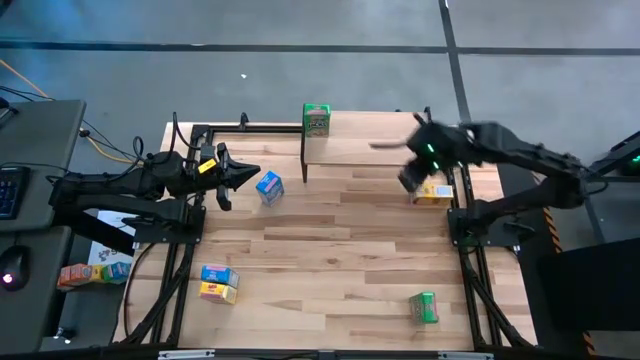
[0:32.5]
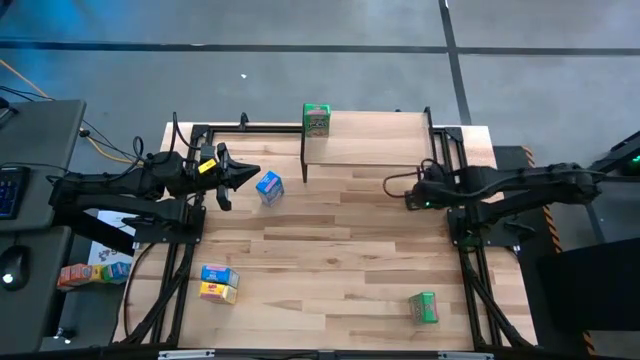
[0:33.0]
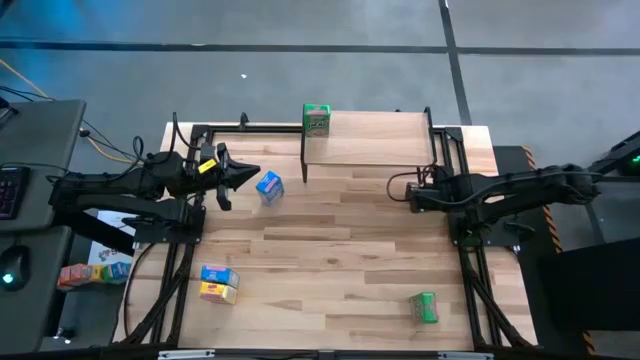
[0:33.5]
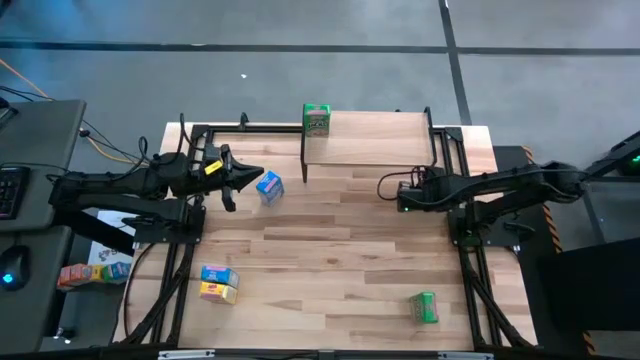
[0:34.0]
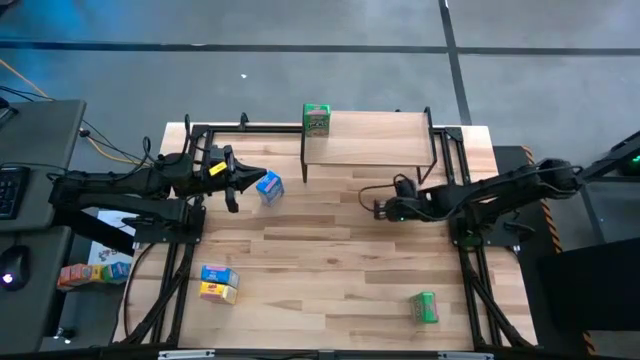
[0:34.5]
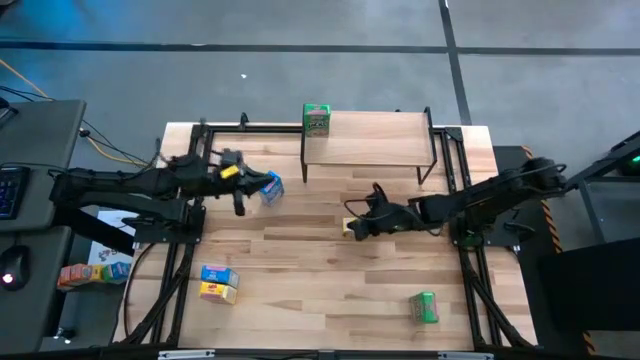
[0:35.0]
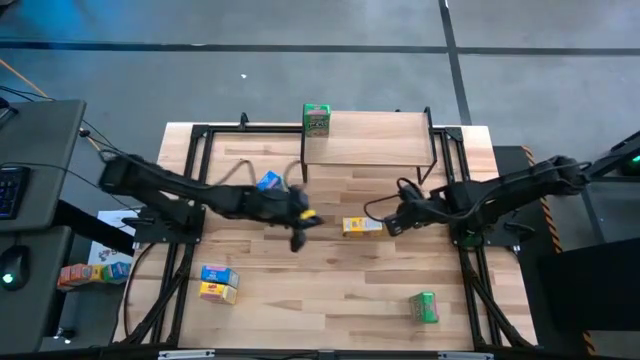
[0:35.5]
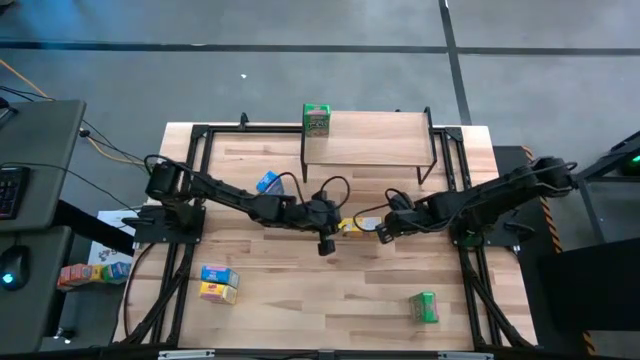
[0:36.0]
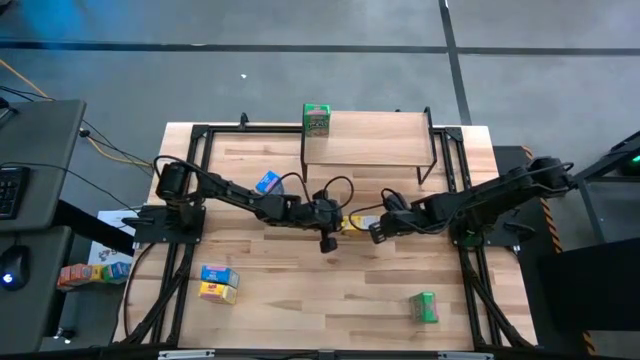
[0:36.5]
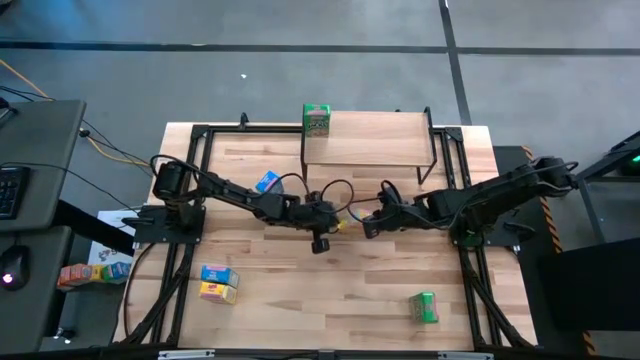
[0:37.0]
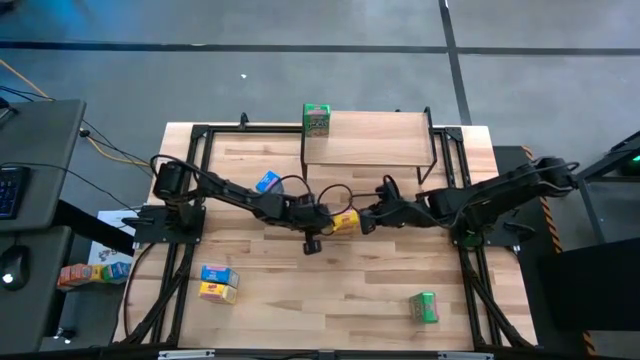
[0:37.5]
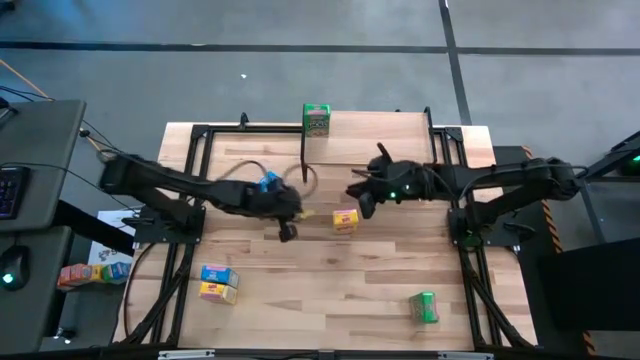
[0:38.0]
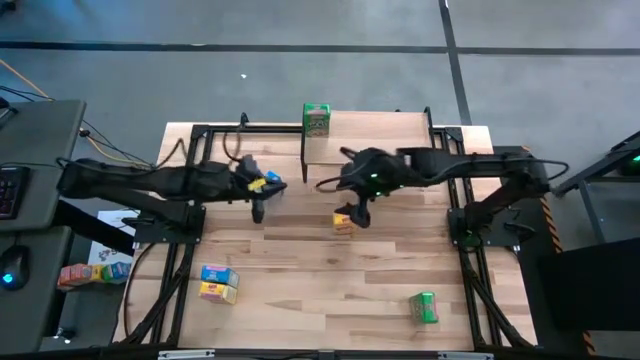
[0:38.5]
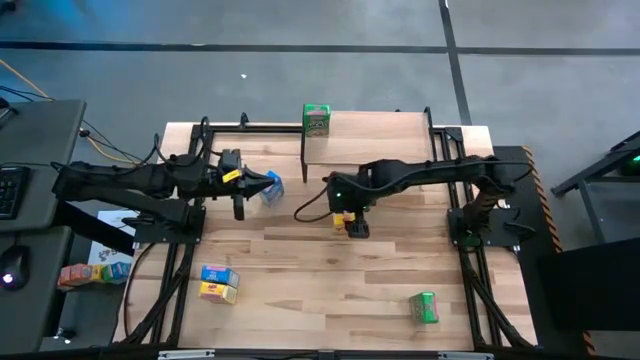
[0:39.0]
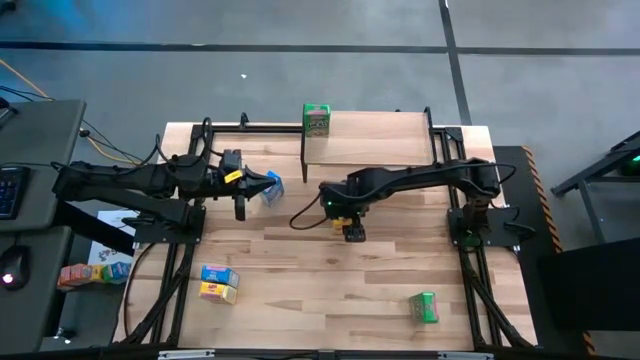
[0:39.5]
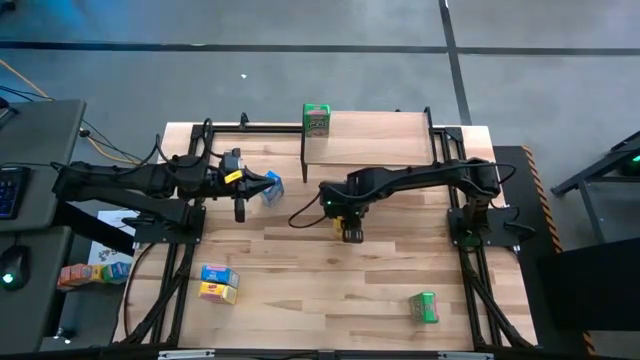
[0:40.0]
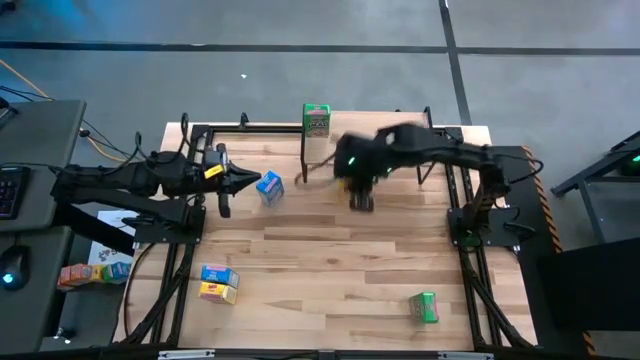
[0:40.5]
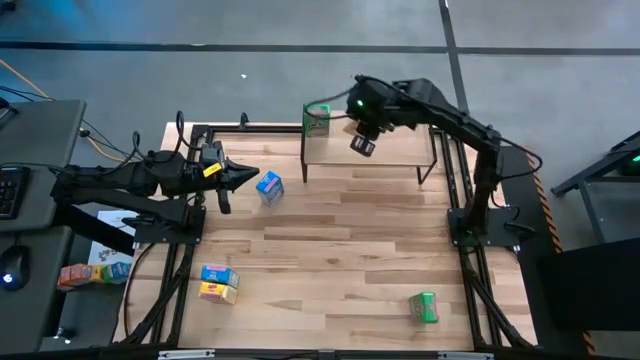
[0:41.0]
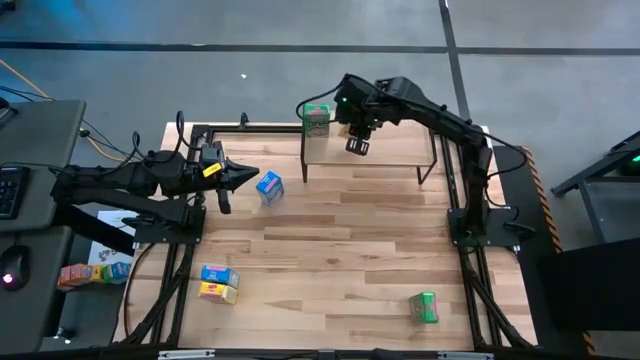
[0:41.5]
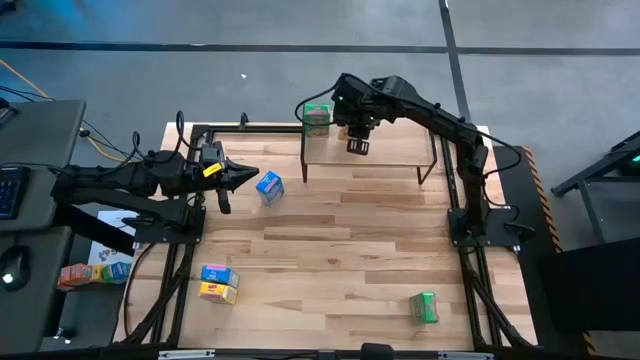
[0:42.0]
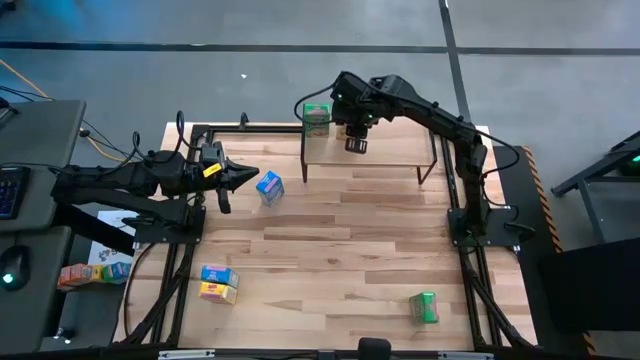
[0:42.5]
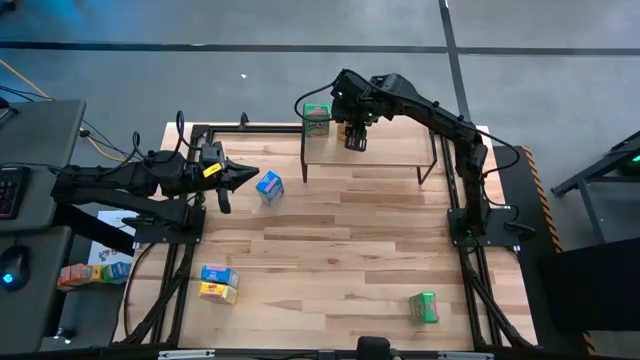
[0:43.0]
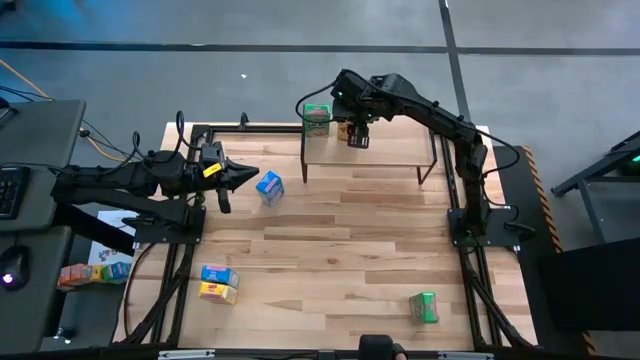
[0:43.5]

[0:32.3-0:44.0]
Task: Stack cereal on shelf
Put the right yellow cereal box on the shelf

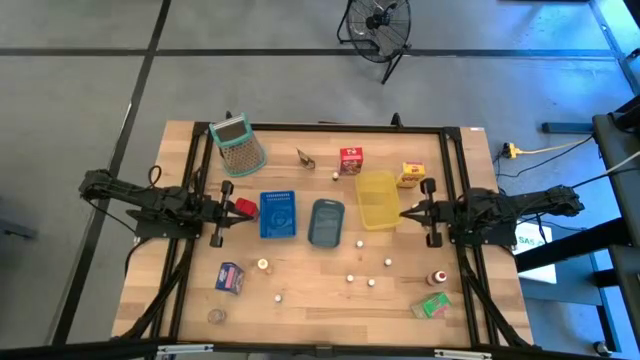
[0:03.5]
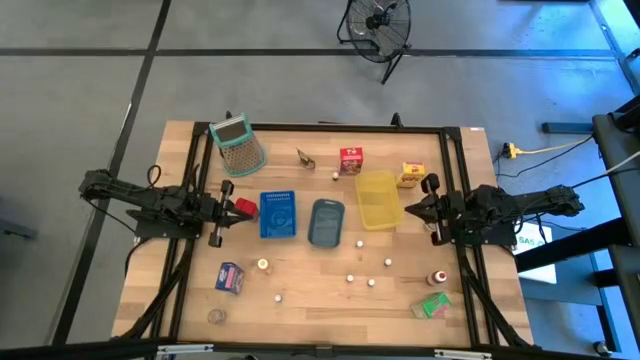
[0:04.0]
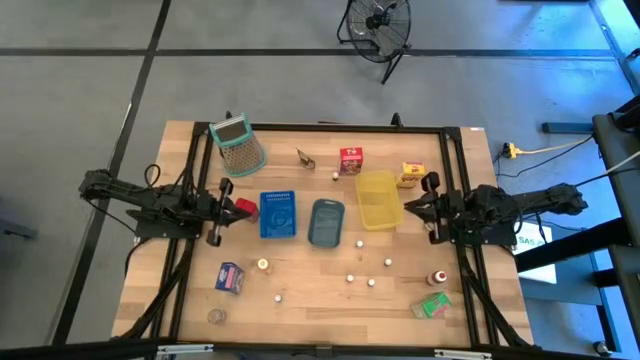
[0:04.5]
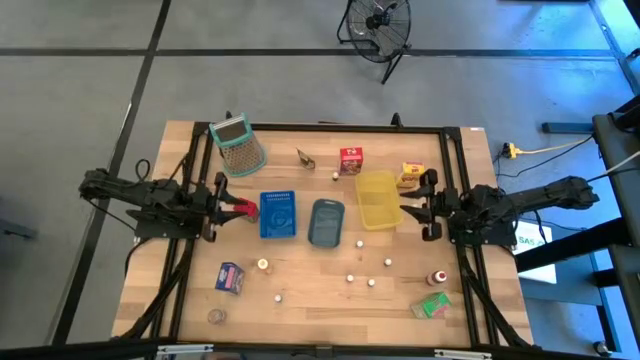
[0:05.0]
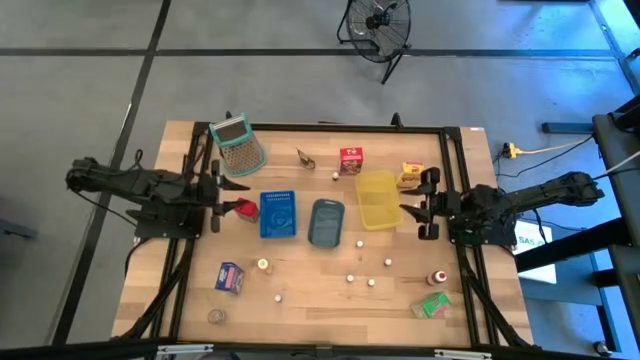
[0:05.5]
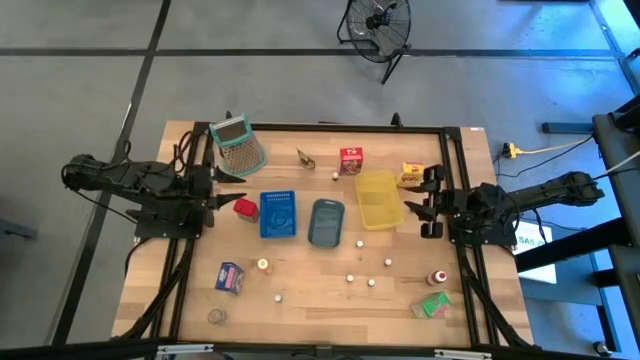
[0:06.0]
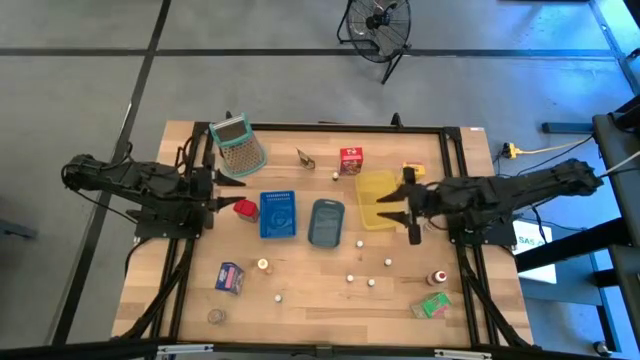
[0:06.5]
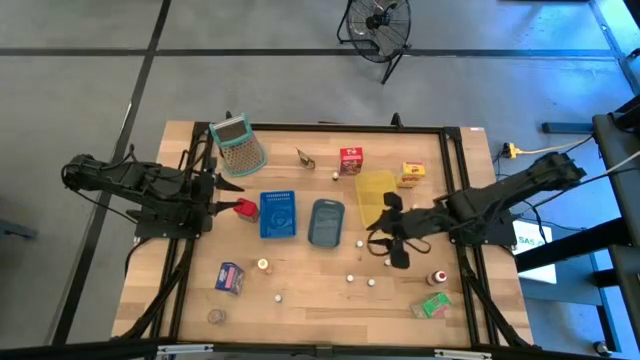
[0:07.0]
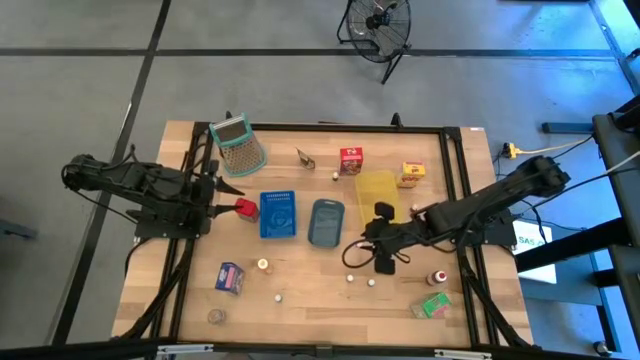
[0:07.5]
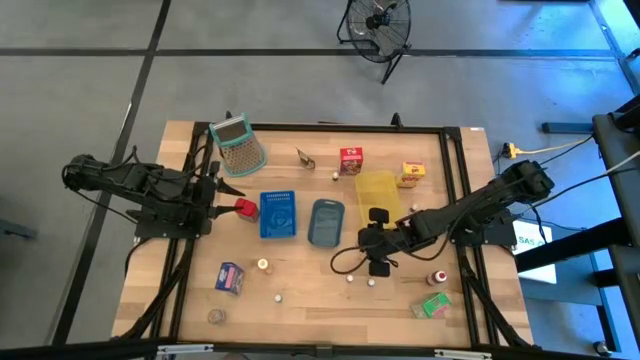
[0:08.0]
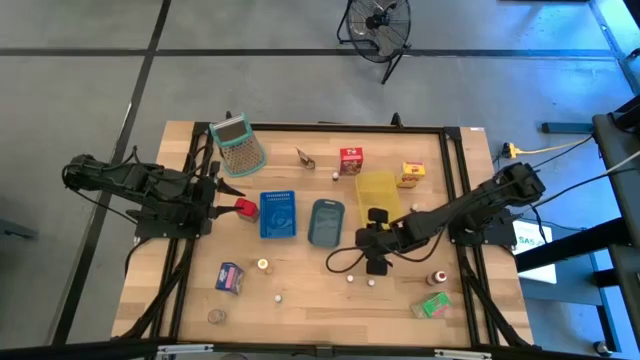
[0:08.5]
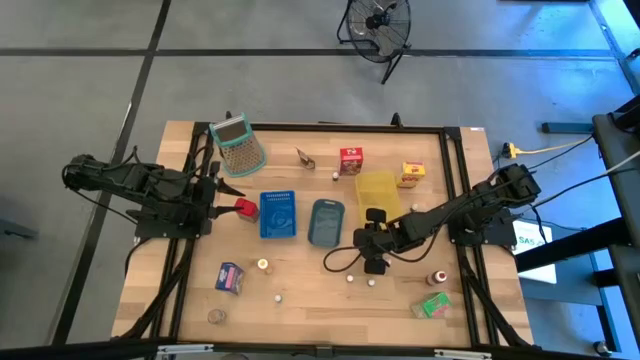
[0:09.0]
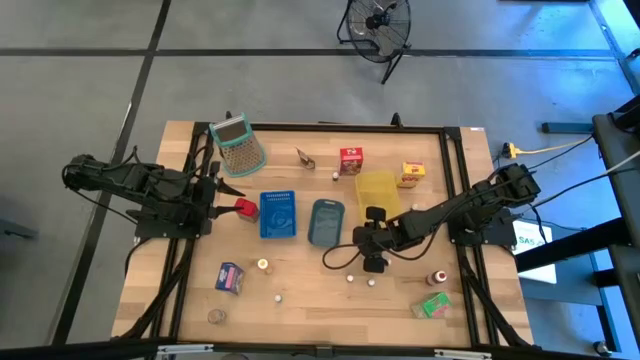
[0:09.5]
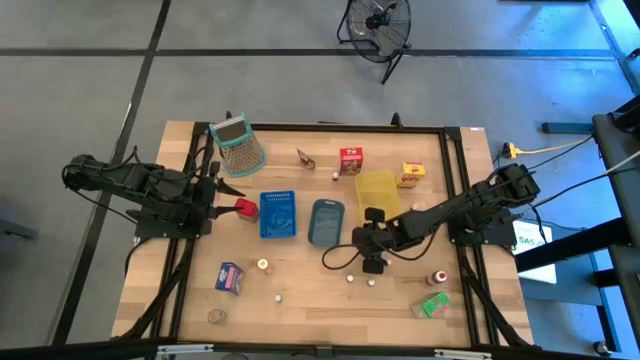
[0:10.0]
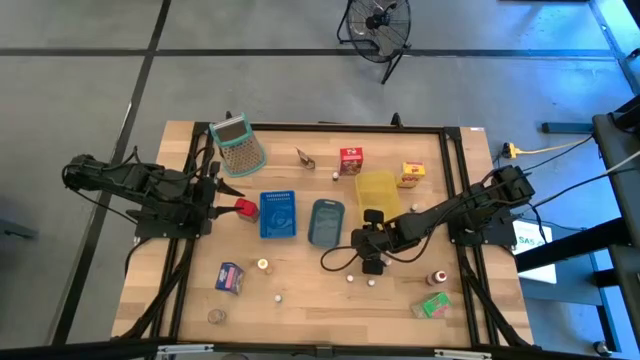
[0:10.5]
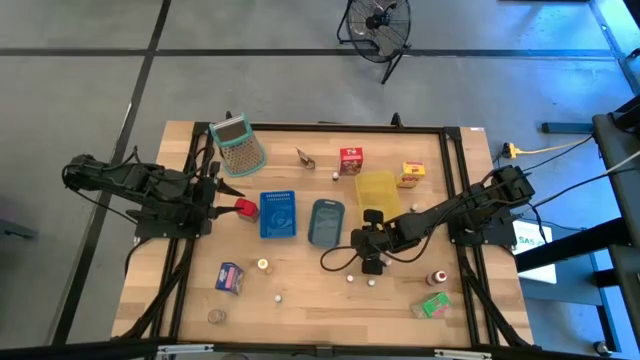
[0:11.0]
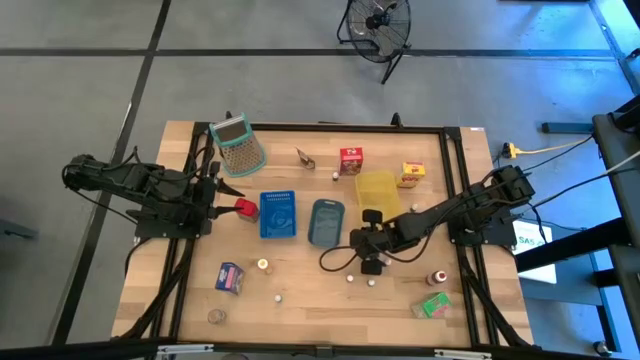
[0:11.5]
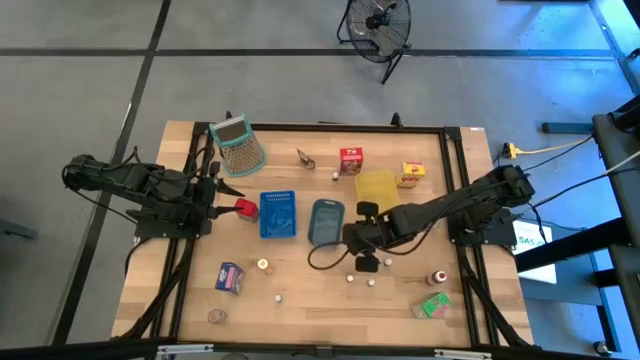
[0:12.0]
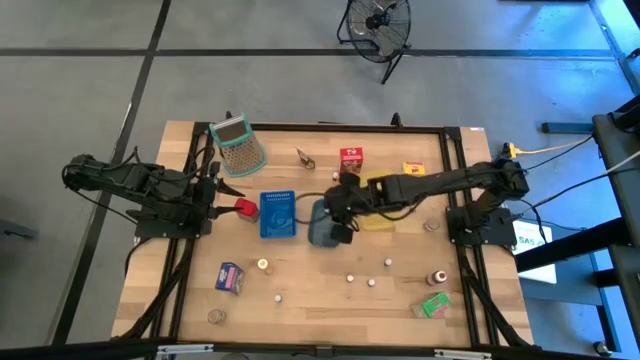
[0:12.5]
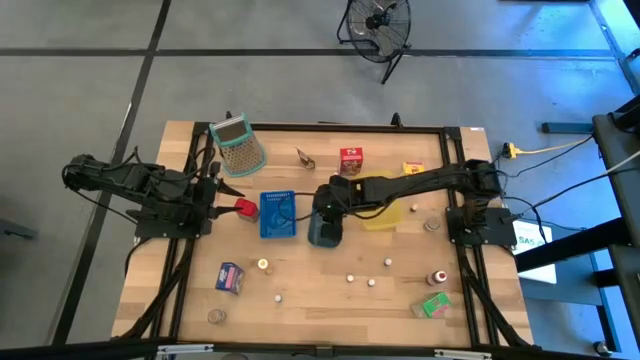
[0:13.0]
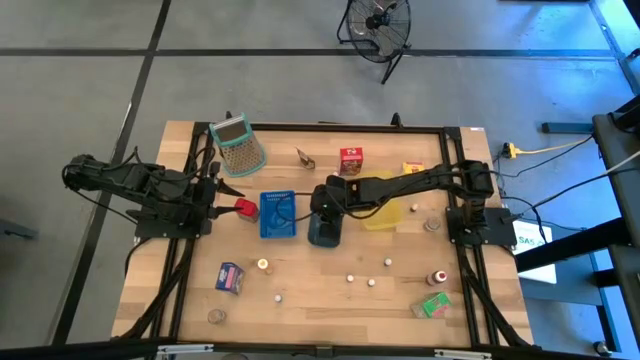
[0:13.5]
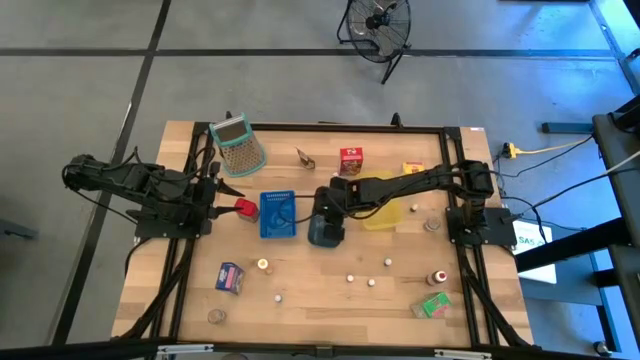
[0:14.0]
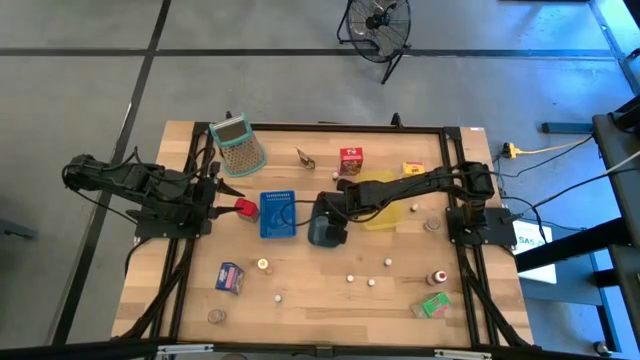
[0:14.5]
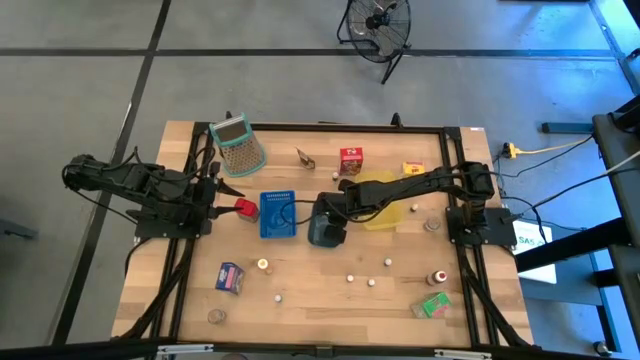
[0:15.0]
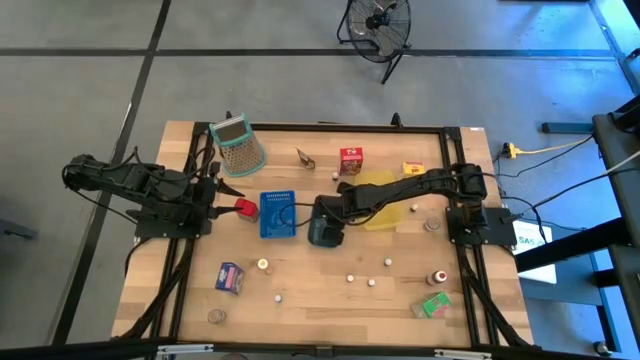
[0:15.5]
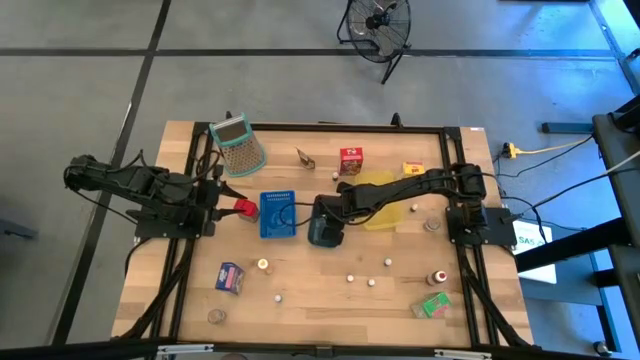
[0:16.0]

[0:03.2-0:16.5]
Task: Pick & Place Kitchen Items
Put the small green food coloring into the green bin
